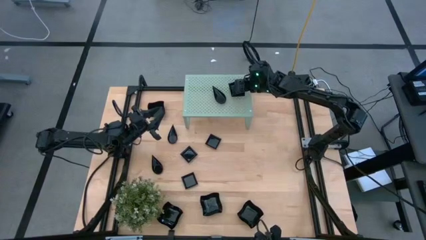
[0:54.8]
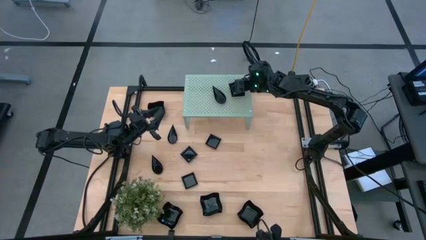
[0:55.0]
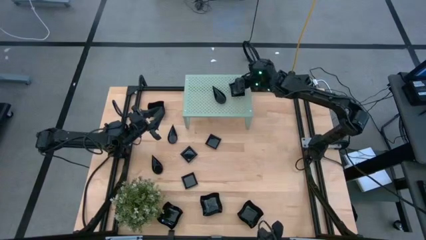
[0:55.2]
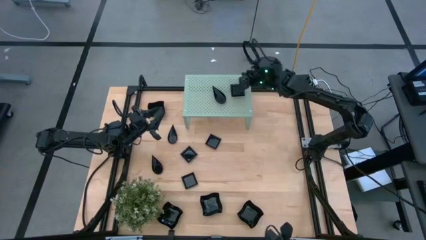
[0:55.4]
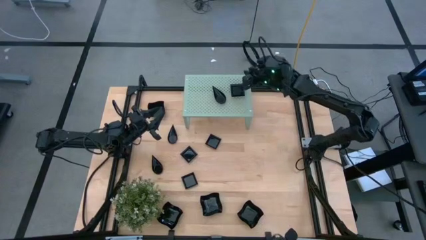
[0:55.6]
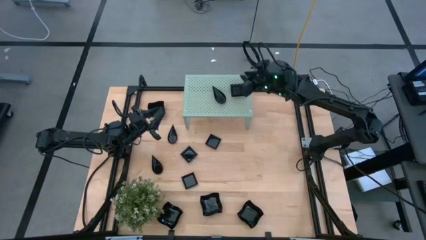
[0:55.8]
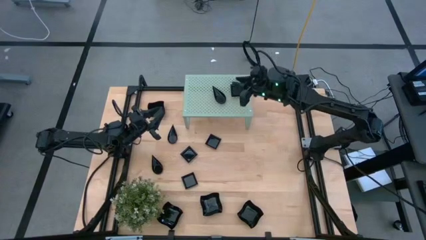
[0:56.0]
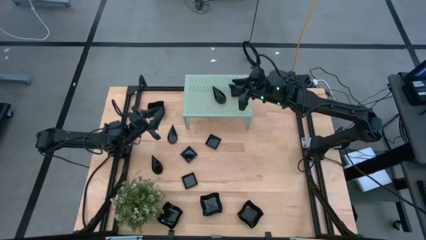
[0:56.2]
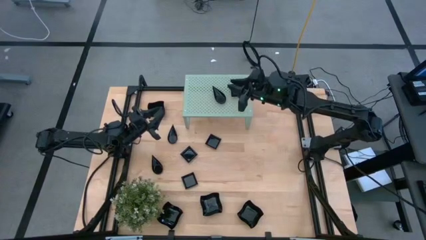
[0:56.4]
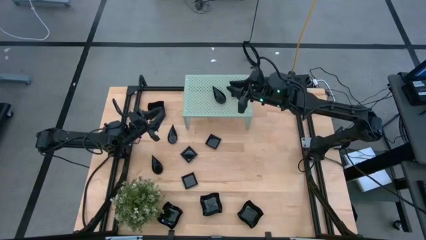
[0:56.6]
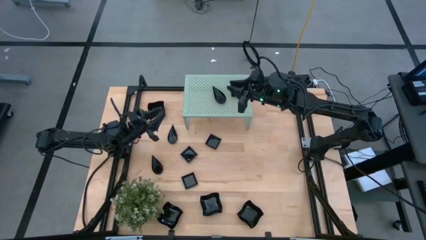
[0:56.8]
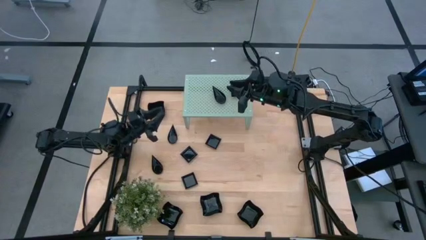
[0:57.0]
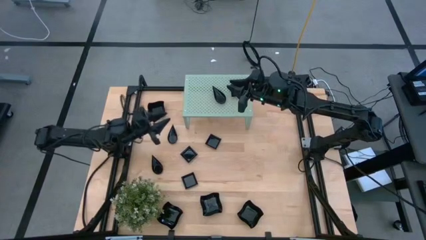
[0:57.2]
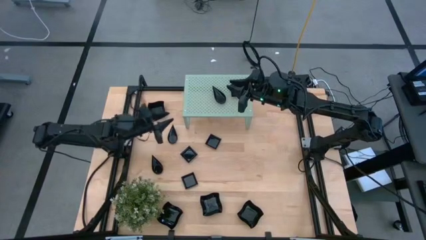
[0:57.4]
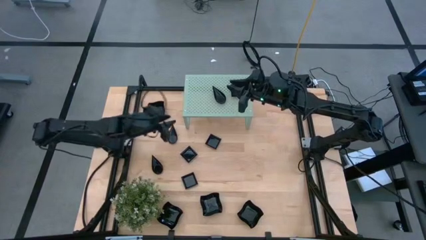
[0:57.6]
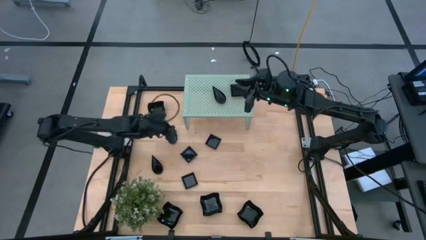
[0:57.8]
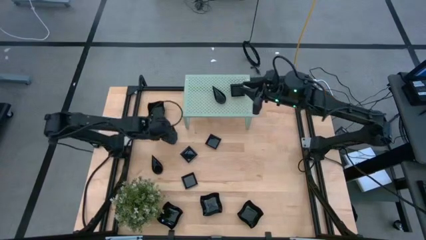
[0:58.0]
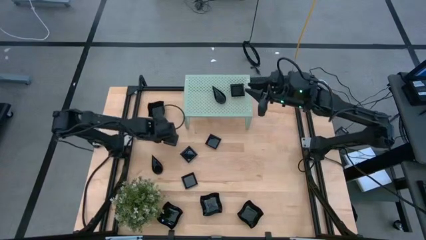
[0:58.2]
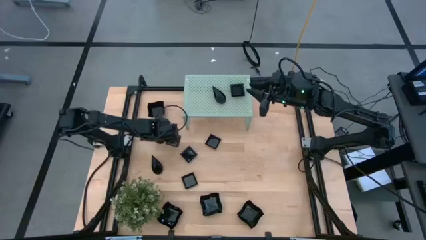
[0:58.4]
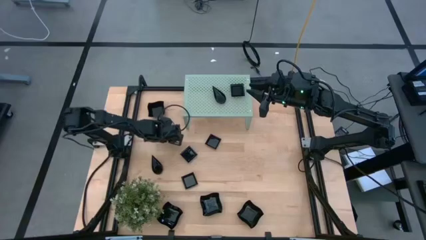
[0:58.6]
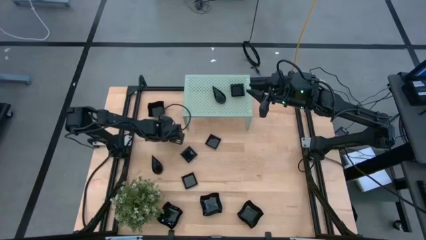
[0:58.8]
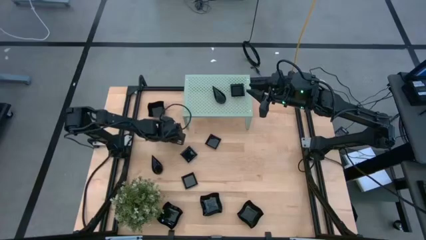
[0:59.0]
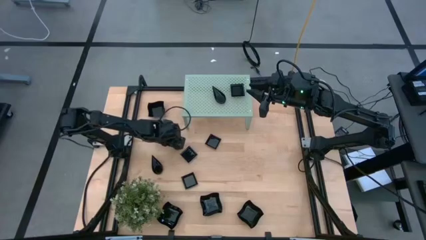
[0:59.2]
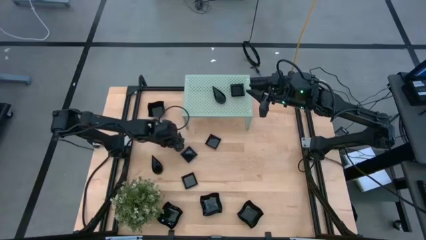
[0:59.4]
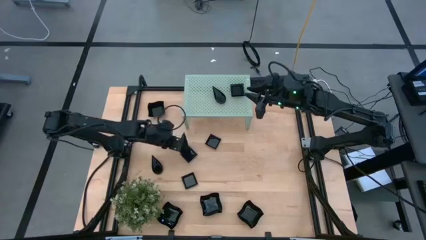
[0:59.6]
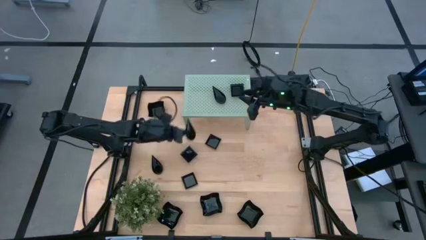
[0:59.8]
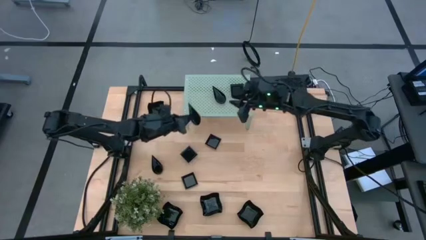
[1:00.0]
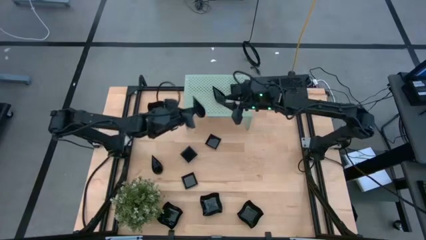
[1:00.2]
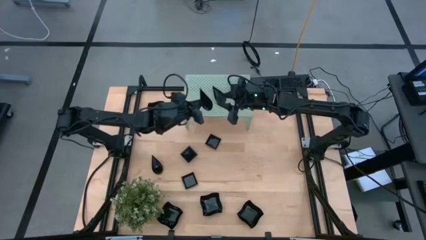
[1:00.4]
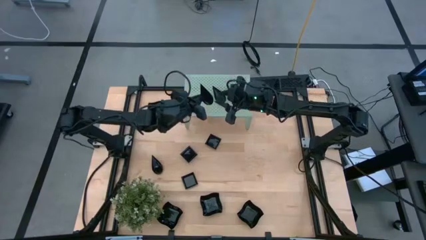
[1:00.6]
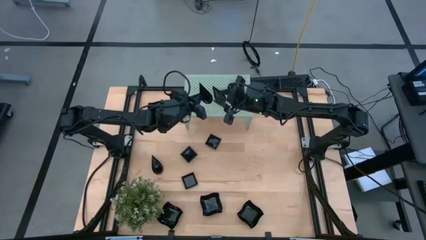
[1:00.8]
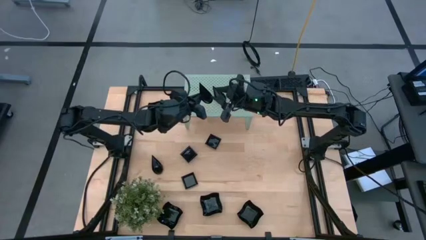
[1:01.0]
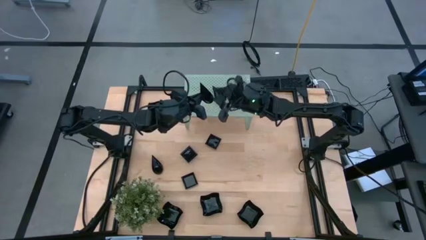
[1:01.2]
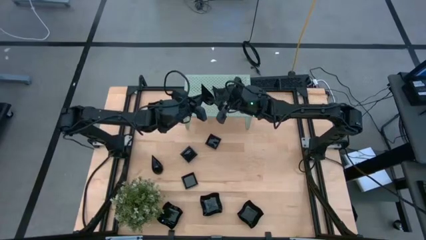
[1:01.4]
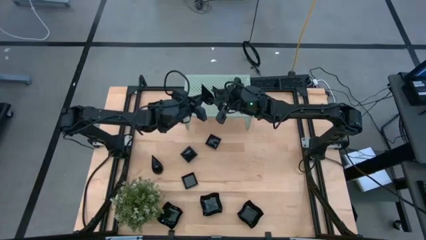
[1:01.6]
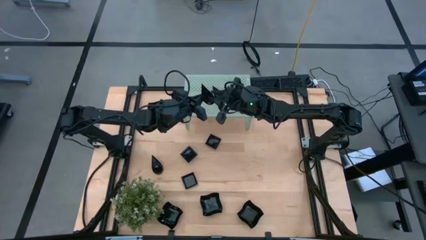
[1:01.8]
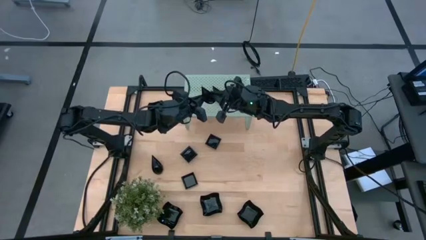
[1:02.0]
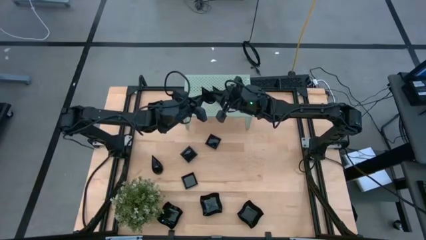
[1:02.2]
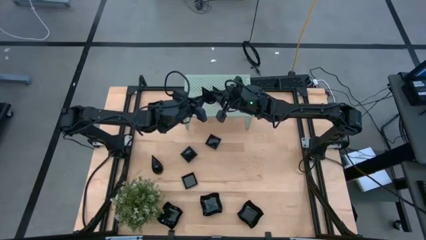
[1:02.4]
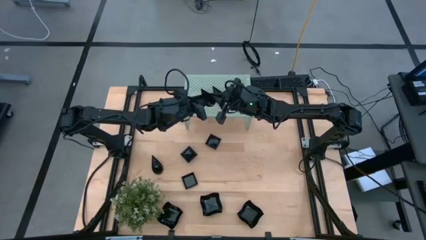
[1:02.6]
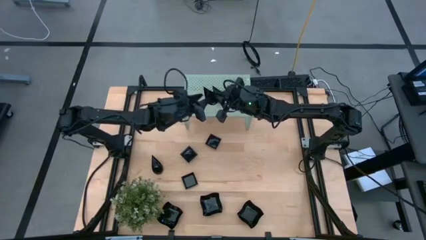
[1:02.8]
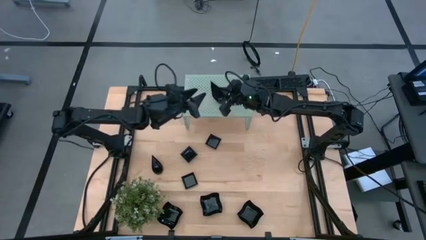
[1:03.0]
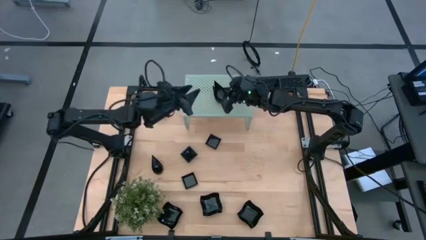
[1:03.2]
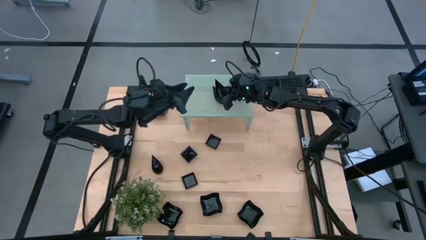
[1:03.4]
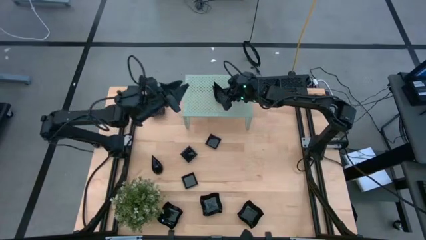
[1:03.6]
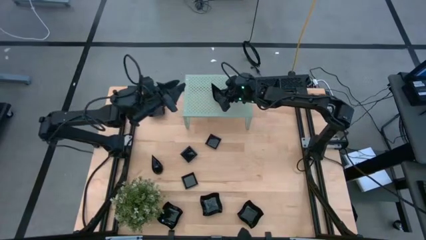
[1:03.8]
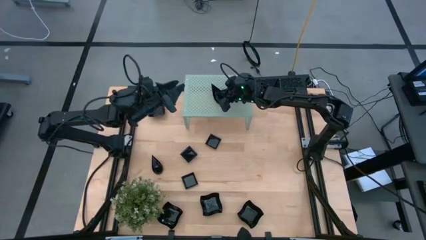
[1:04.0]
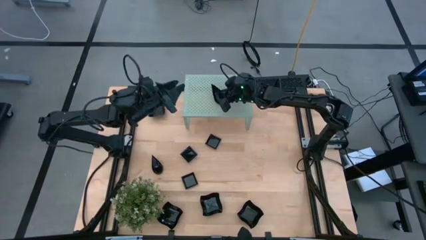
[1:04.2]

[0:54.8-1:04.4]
Task: Pick & Place Mini shaped plates
Stack the black drop-shaped plate on the shelf

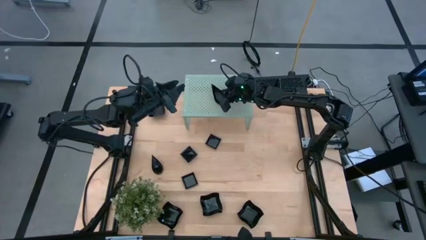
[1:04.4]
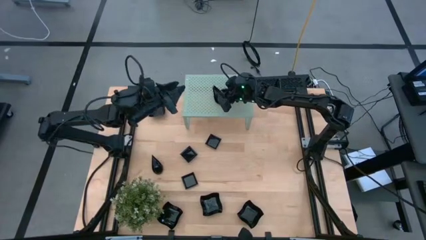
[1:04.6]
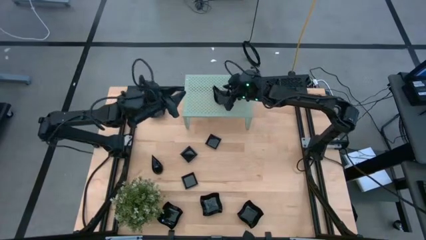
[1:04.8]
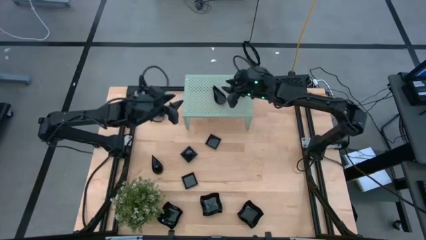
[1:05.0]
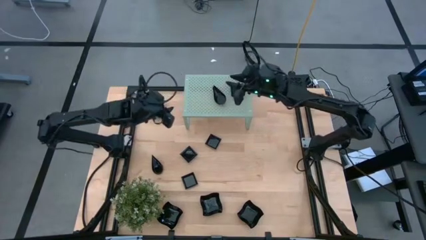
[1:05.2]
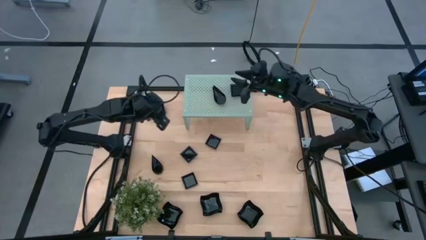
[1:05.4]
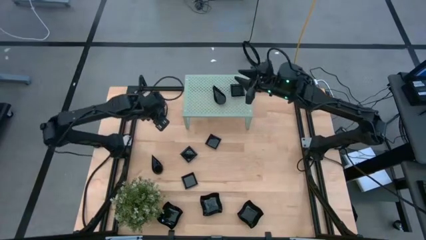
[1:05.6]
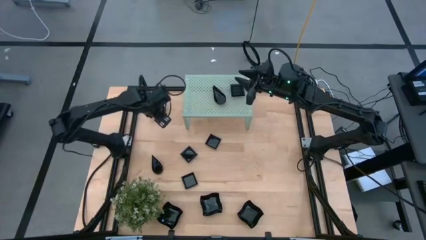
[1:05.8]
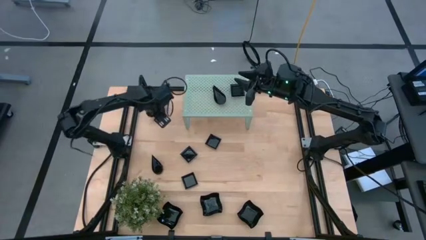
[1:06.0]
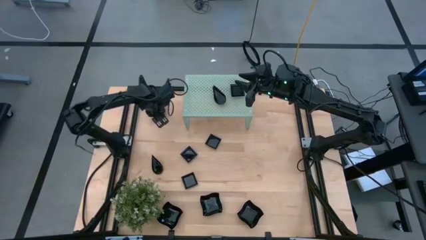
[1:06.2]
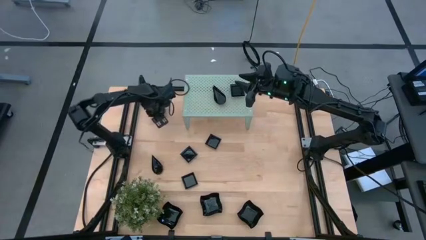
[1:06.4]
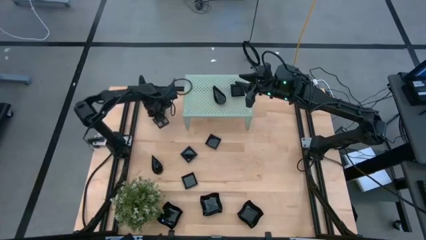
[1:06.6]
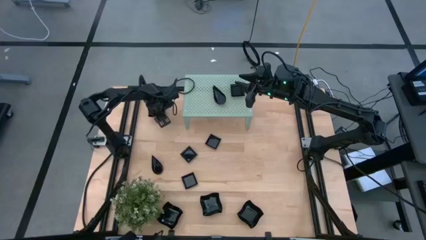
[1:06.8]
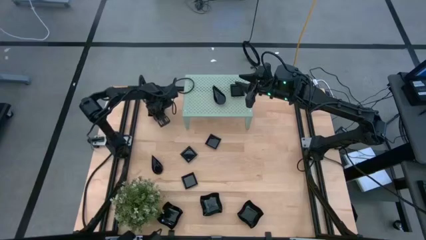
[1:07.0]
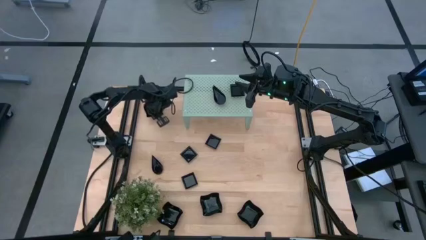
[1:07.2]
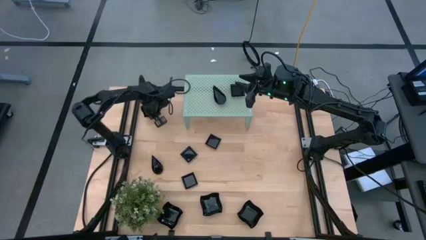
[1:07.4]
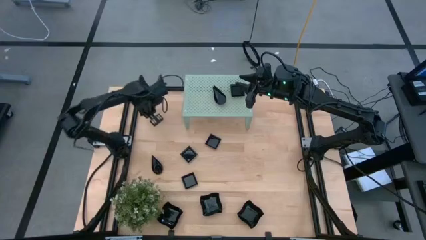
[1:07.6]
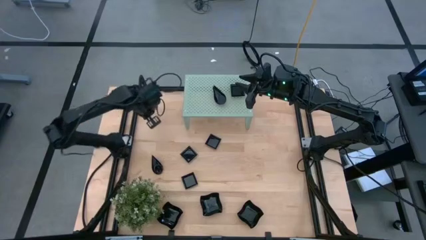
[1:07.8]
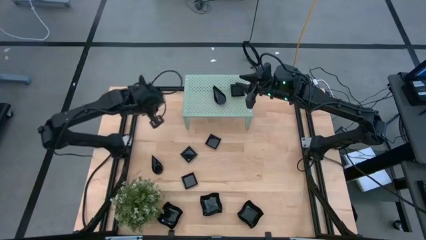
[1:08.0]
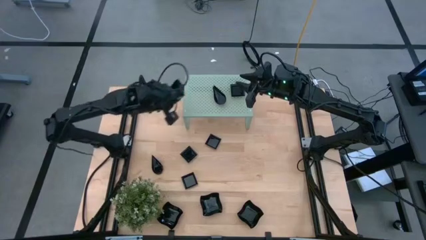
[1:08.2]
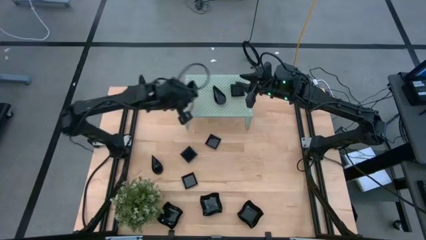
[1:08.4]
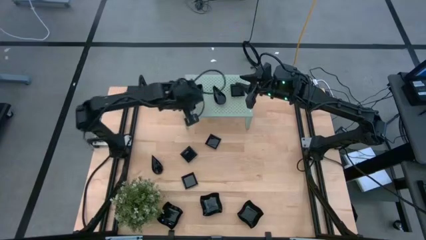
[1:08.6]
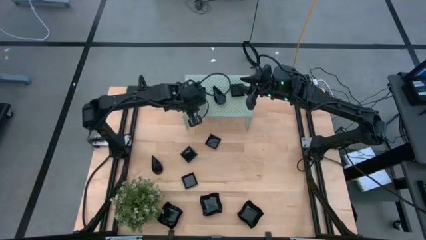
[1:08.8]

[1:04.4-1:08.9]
Put the black distorted square plate on the shelf
